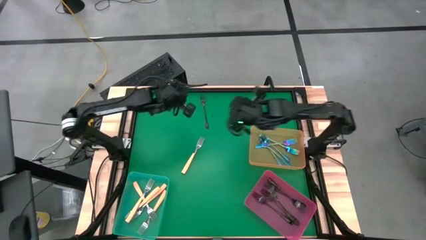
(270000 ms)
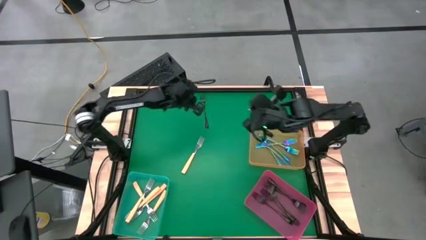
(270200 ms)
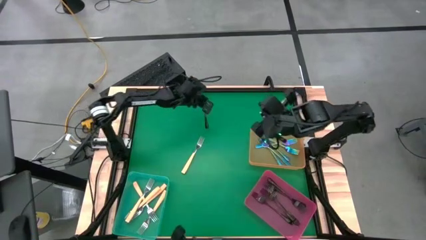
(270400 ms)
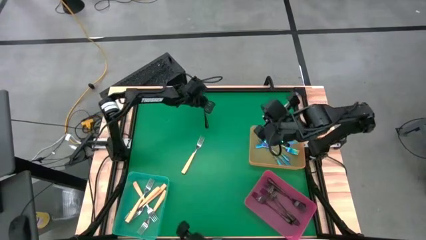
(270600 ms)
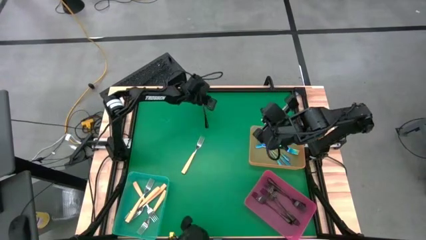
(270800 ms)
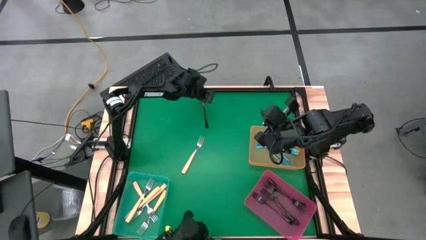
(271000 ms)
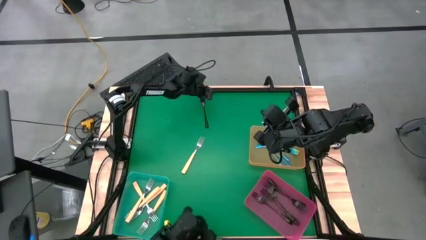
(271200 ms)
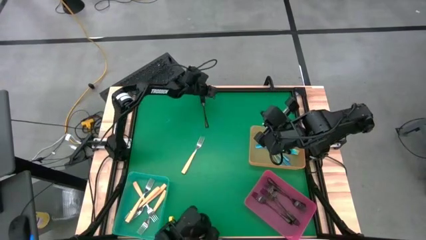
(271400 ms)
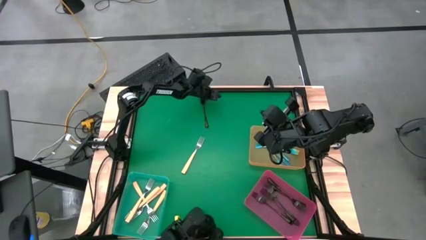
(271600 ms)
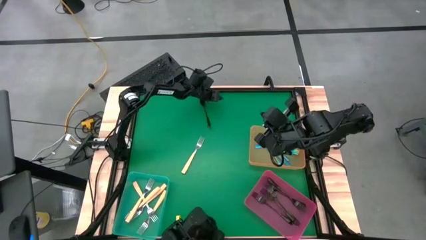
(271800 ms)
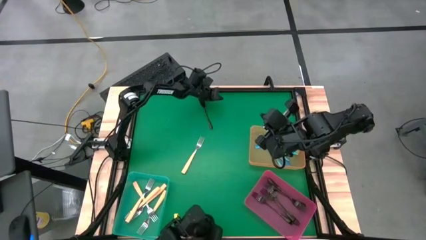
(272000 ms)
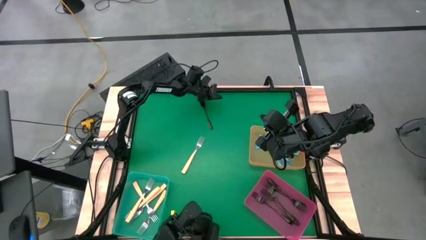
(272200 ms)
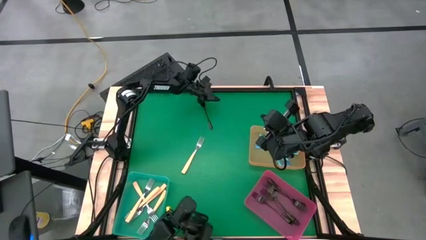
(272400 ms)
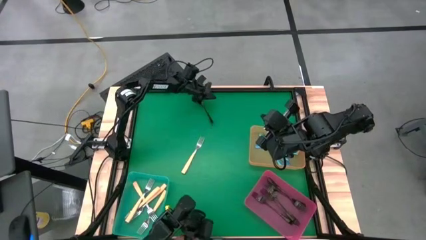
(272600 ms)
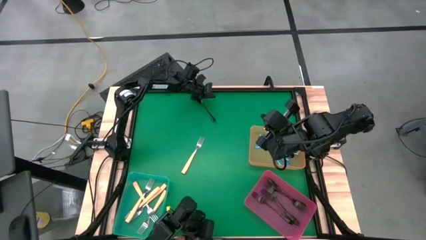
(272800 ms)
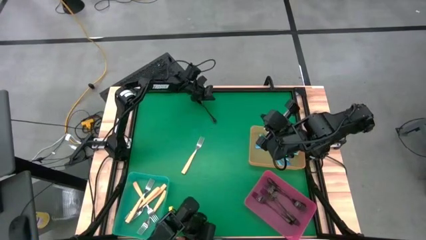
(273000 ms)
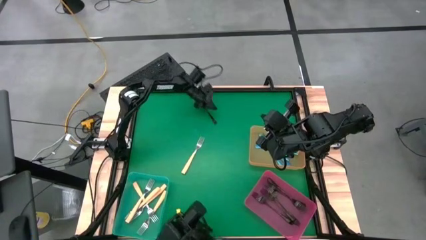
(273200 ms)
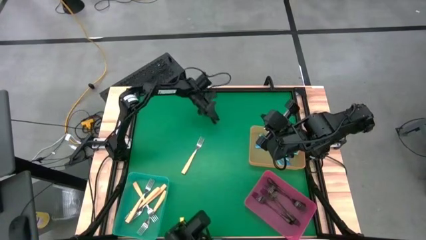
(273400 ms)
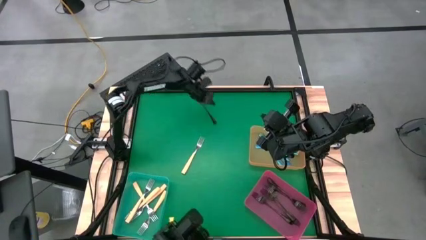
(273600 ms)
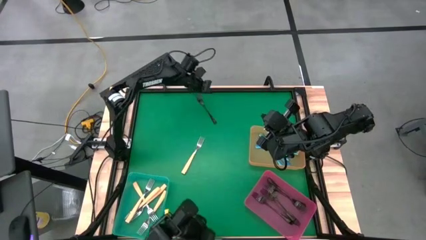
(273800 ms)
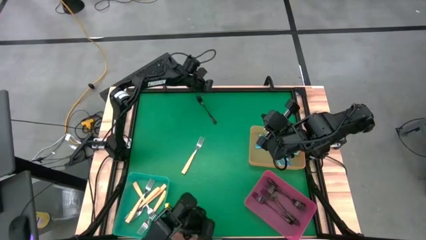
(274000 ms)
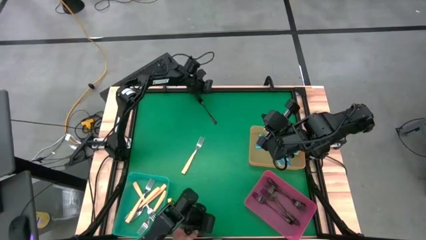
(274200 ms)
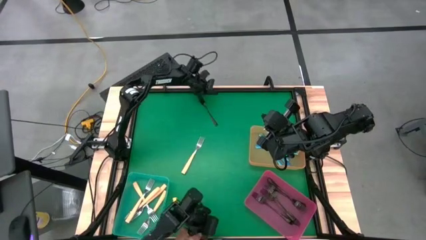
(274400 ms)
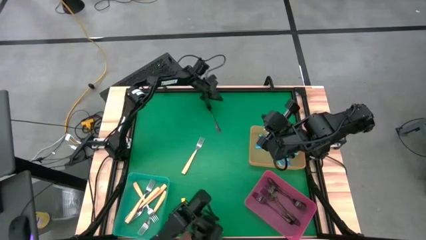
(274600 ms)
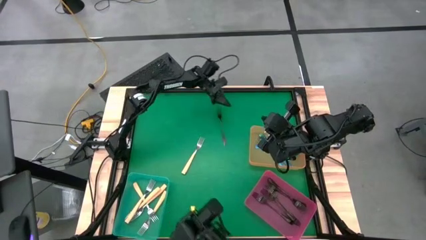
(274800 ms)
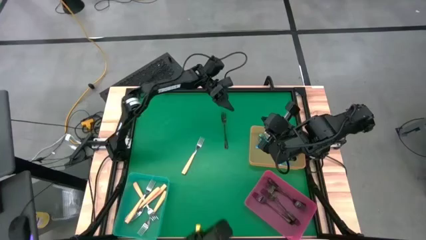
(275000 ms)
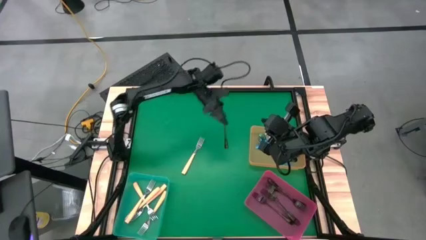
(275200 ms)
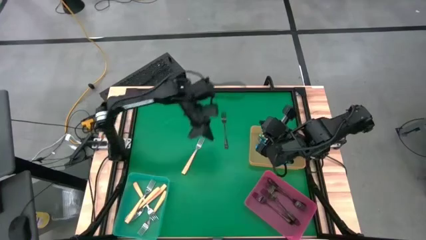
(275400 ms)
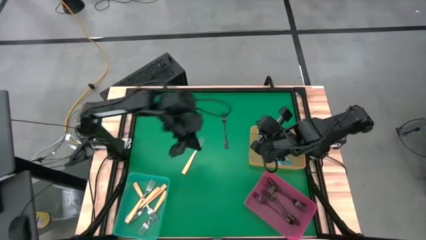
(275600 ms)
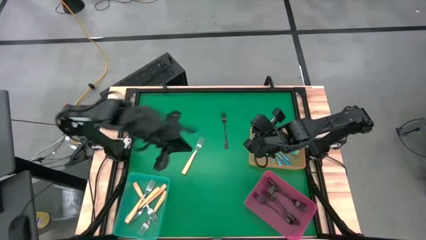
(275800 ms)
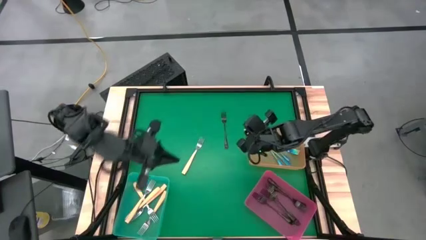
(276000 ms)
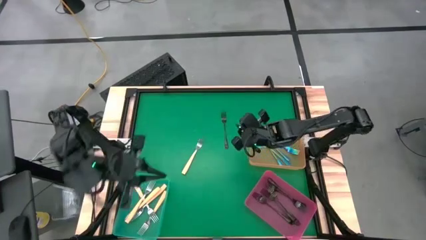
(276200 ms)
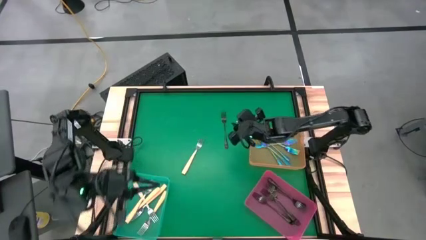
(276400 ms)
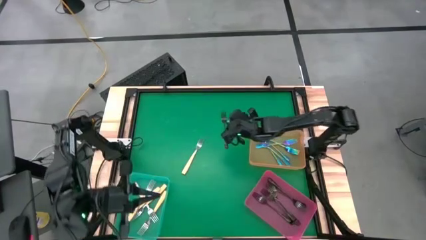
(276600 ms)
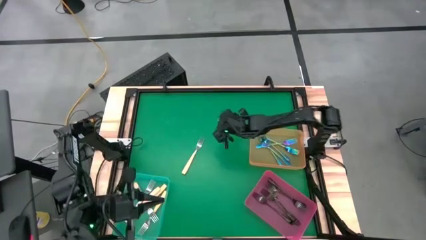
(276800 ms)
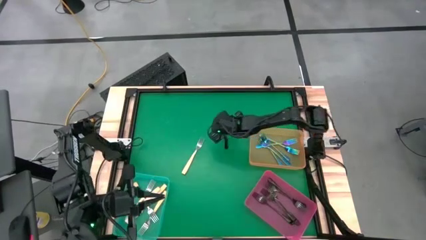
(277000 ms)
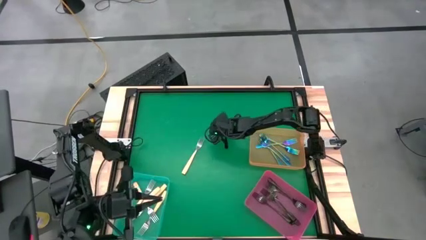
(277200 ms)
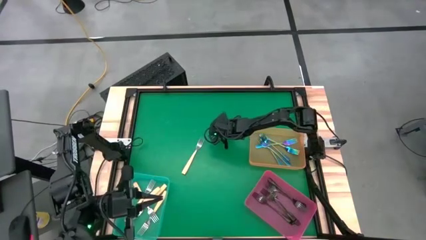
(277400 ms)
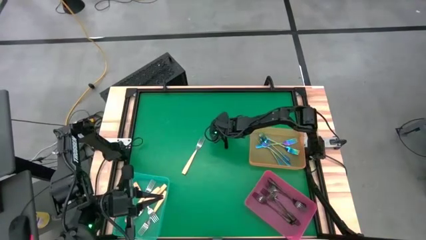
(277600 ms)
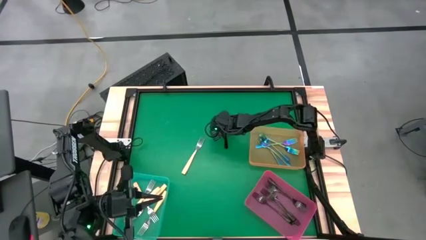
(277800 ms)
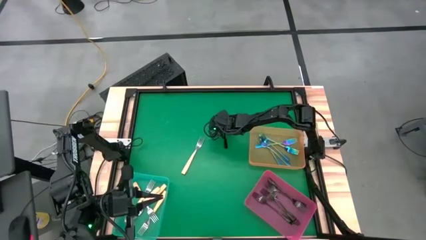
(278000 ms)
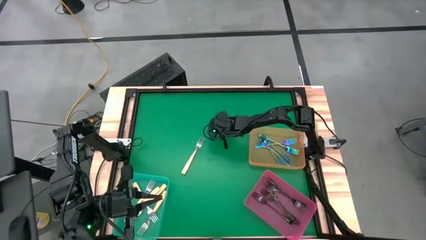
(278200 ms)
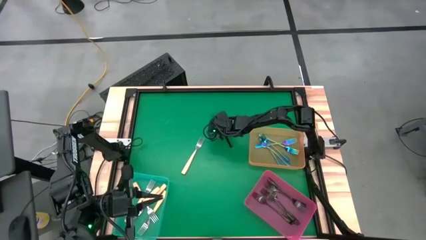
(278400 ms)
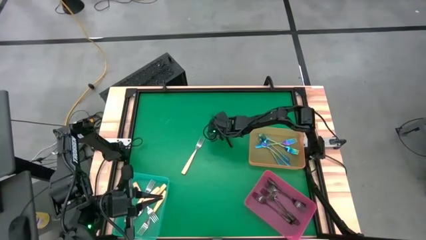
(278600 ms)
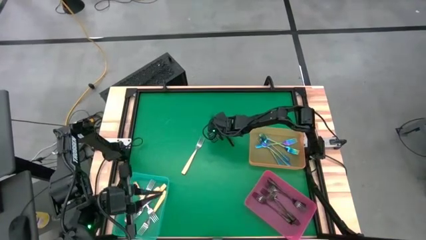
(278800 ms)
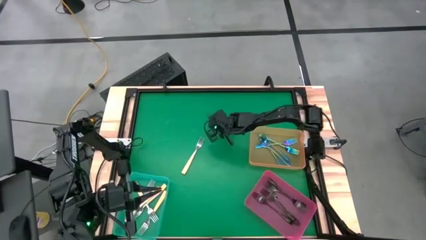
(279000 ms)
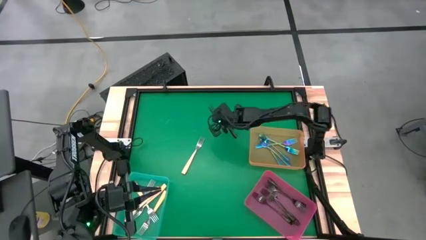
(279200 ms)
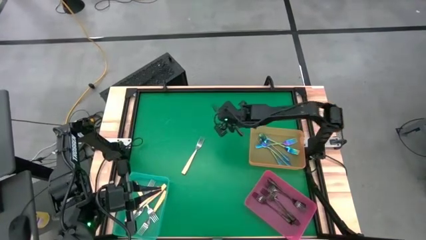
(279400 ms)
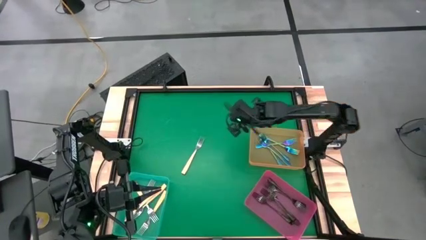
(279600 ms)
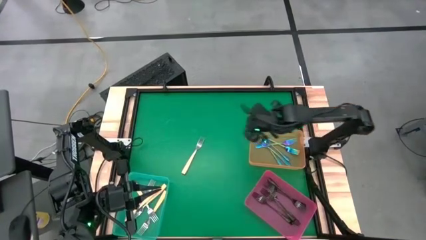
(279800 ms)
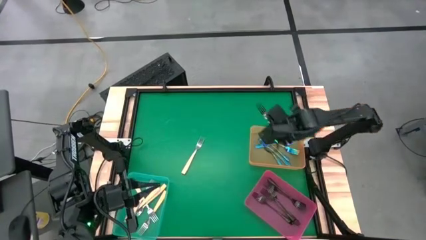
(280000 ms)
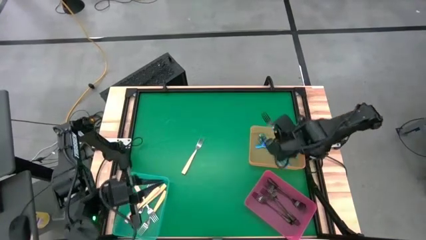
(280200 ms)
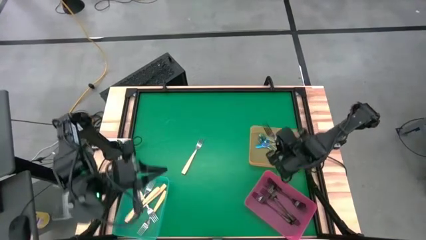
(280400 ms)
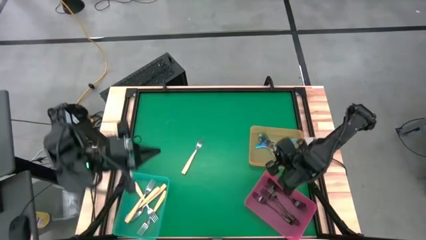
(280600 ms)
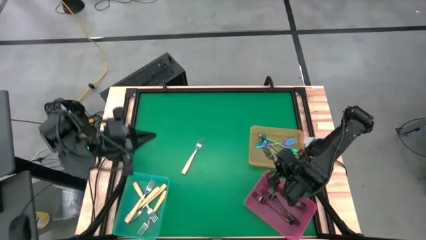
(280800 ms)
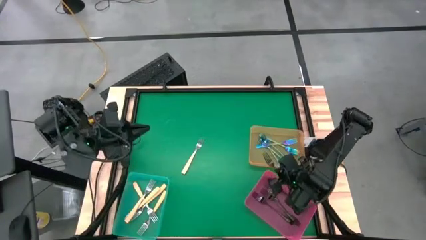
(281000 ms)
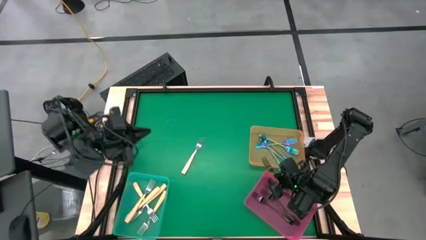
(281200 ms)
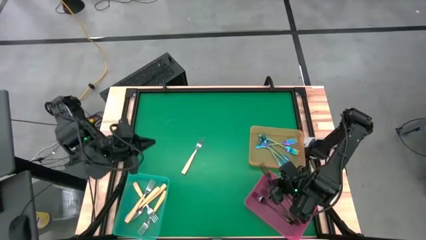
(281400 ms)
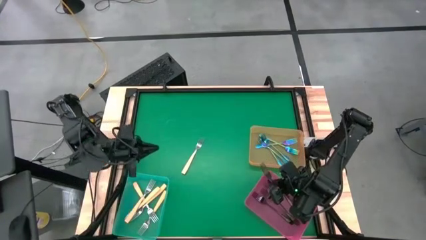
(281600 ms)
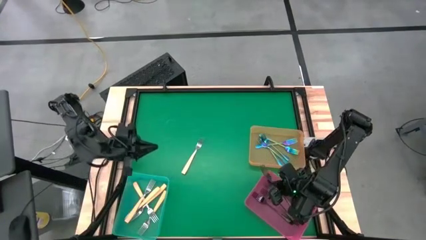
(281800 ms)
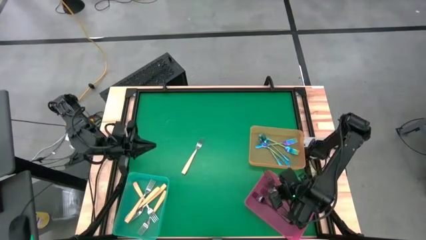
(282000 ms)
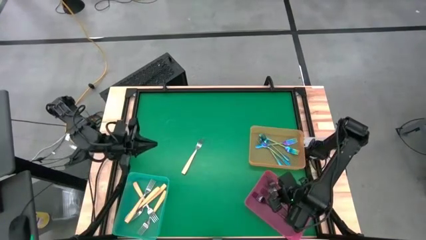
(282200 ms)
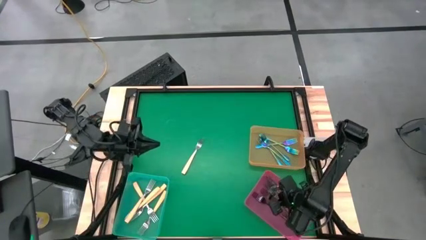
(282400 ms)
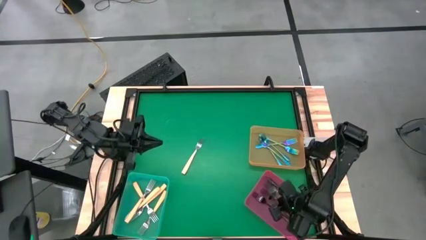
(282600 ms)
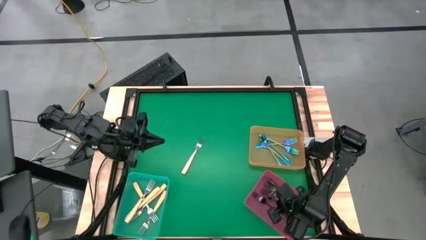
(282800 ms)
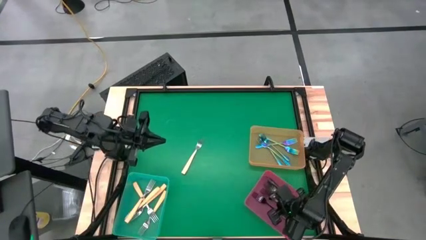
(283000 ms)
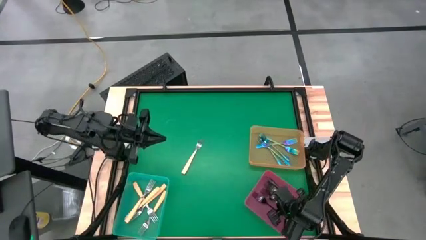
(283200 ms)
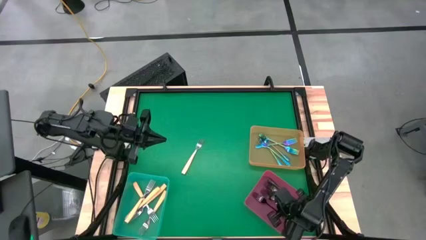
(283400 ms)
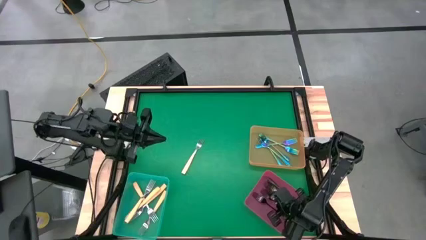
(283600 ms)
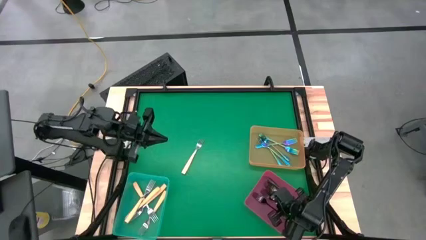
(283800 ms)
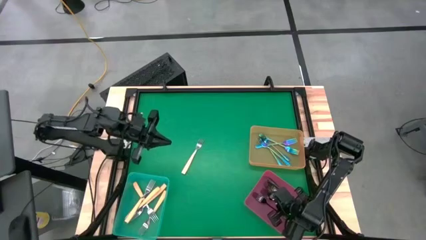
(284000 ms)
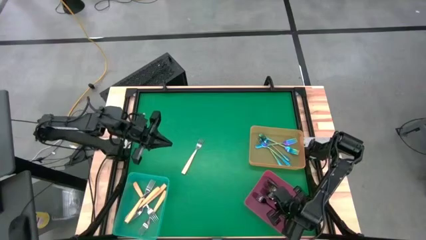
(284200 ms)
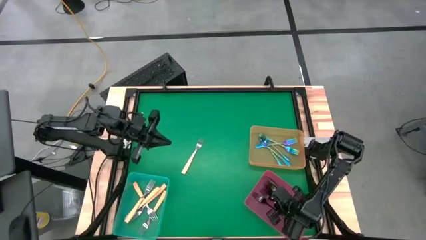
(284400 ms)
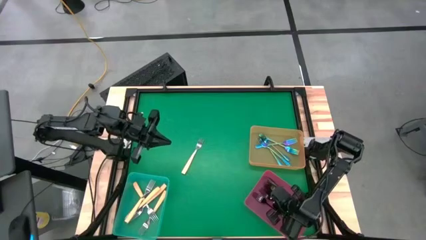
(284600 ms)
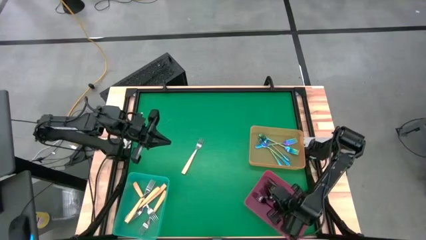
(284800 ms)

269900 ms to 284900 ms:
Task: Sort silverware by color (type)
Put the black fork into the pink bin

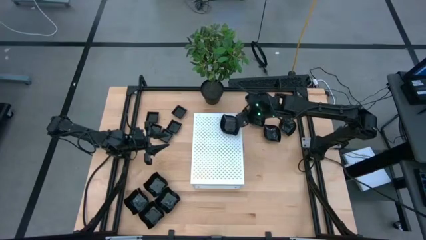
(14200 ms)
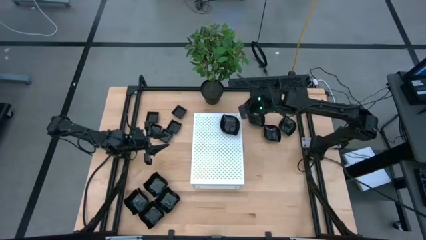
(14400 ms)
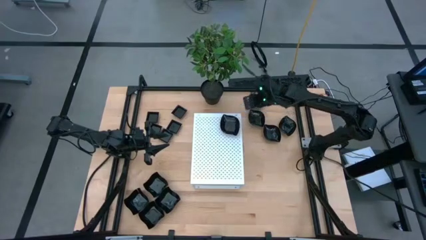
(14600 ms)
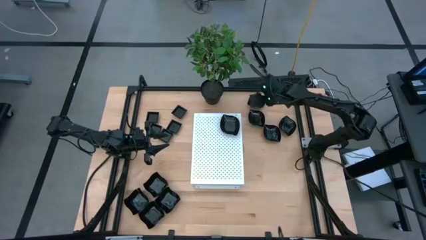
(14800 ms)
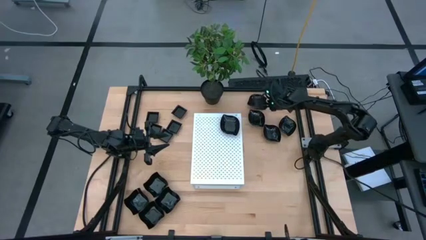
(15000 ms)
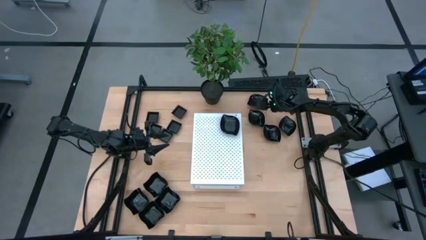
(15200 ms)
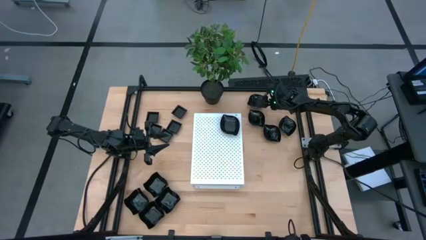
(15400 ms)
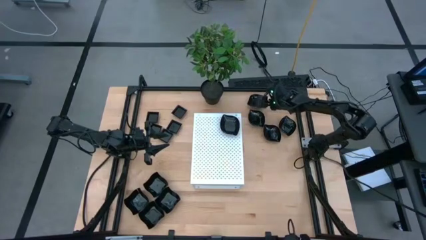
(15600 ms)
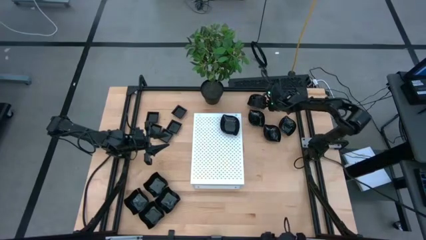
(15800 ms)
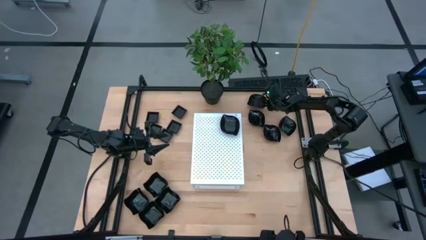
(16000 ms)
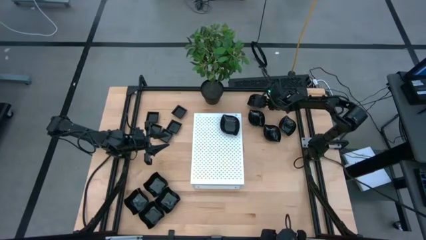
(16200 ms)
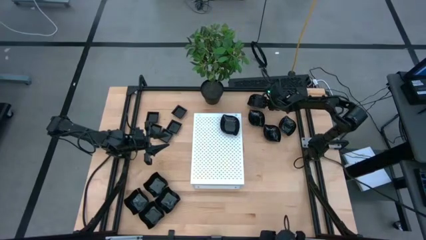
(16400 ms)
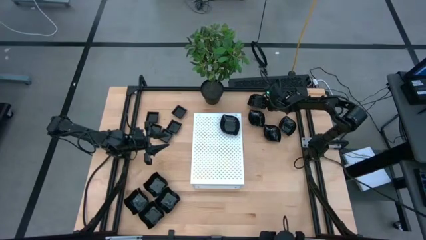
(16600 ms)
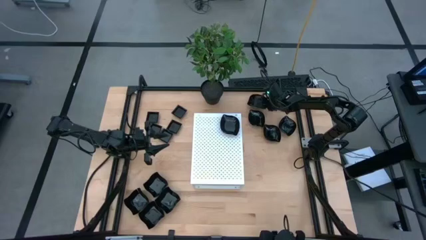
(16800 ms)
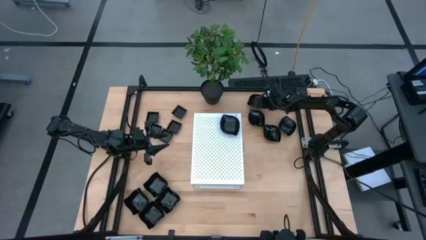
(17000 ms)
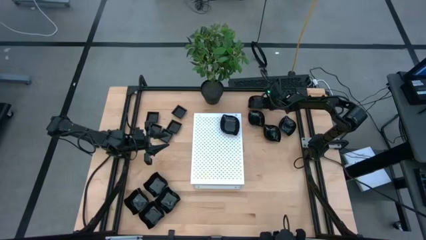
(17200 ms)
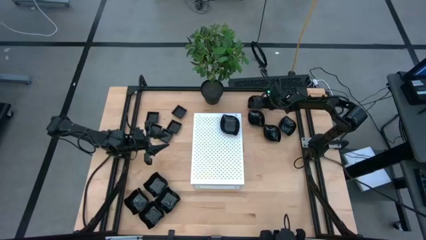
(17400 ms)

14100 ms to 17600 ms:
Task: Pick & Place Mini shaped plates
Stack the black leaf shaped bowl on top of the other black leaf shaped bowl on the shelf
